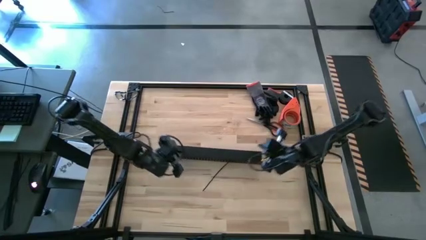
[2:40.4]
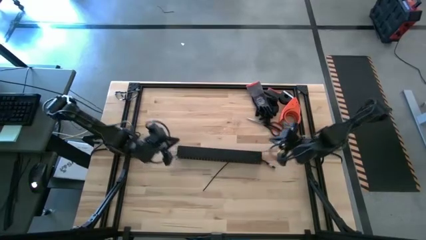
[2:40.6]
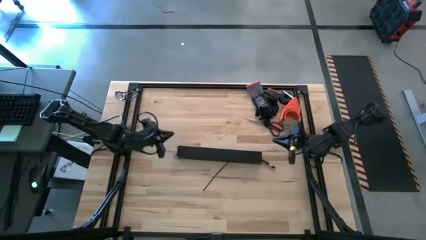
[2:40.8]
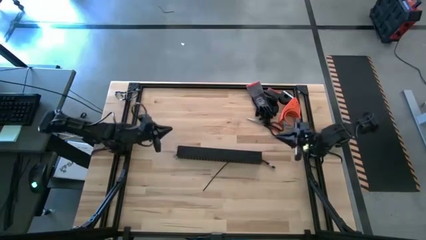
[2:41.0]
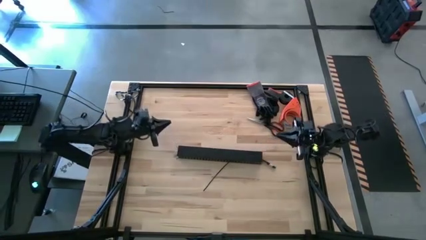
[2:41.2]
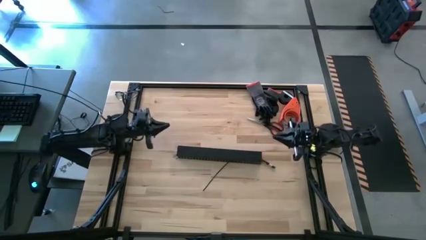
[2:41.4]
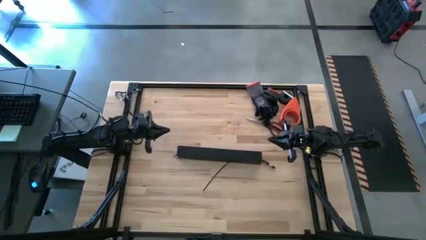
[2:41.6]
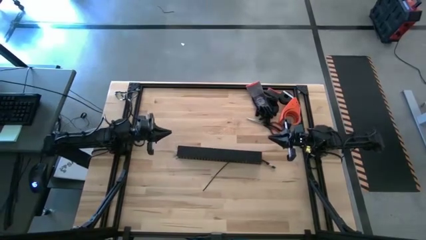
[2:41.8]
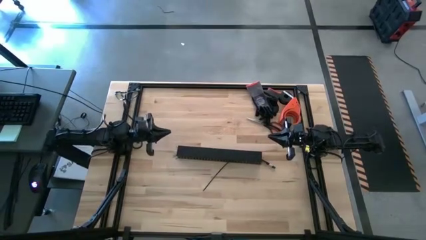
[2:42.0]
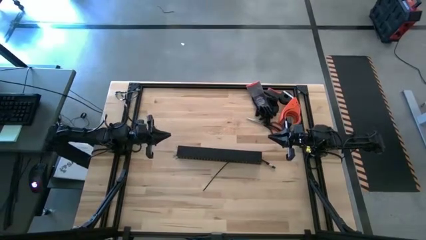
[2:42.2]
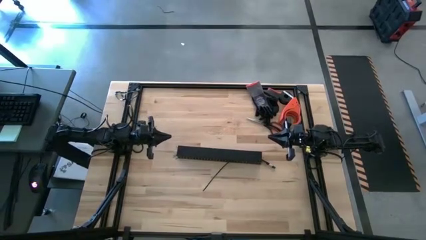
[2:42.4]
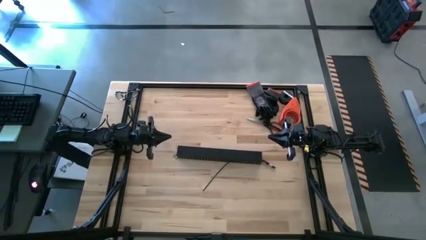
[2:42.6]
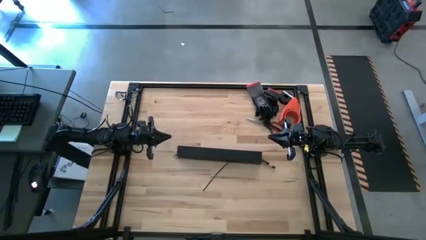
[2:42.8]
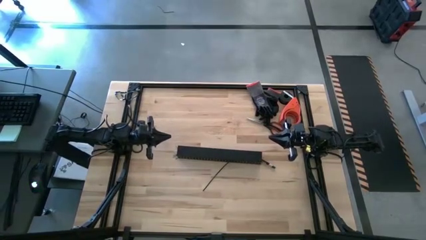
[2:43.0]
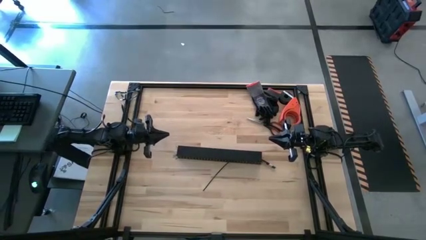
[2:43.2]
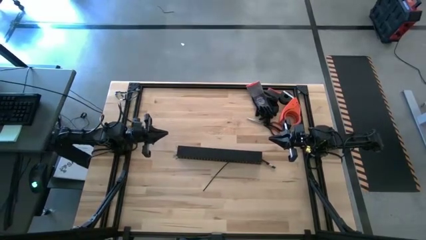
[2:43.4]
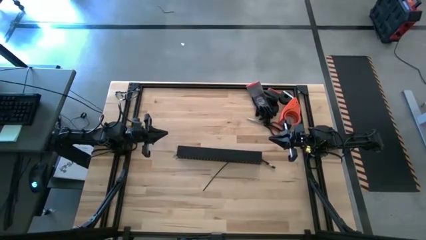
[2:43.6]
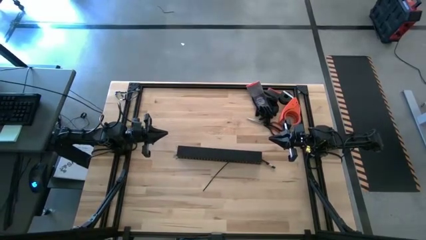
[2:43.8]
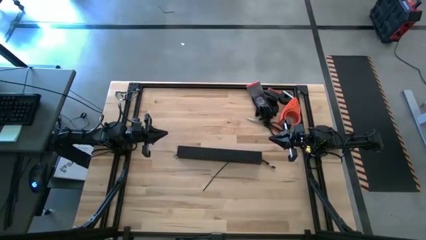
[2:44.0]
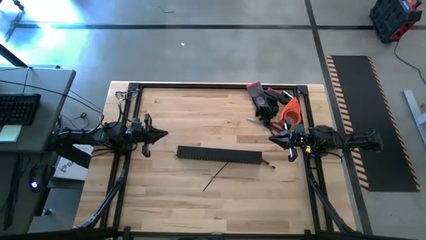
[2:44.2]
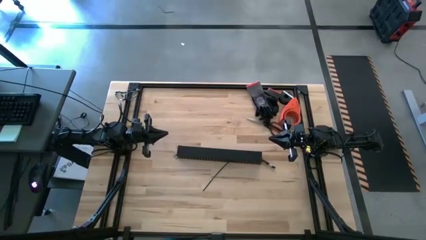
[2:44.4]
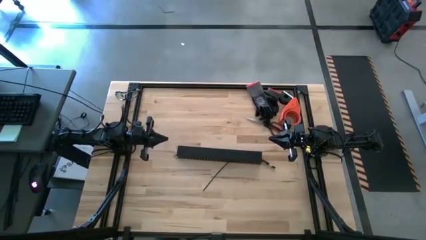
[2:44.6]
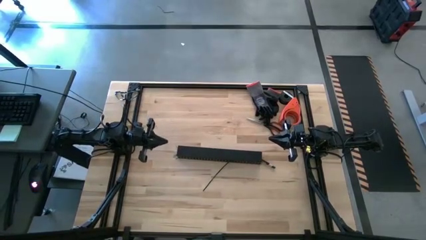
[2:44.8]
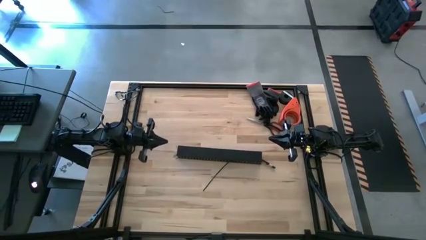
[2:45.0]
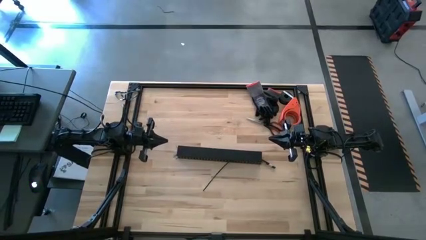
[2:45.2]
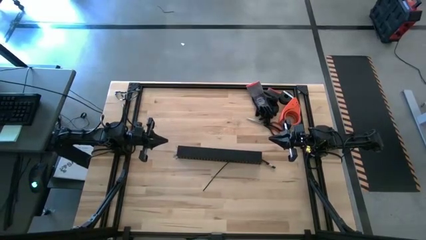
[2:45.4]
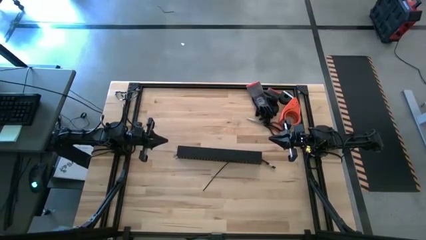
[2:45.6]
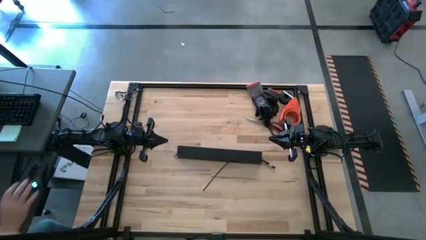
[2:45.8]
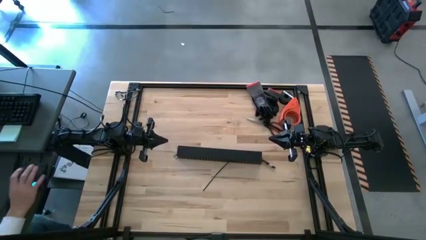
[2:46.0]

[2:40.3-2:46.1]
Task: Ziptie cables
Return to Home Position

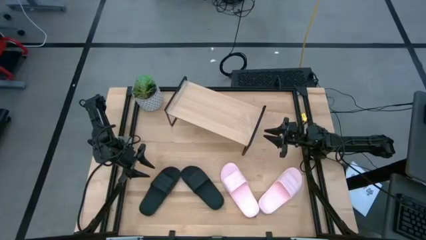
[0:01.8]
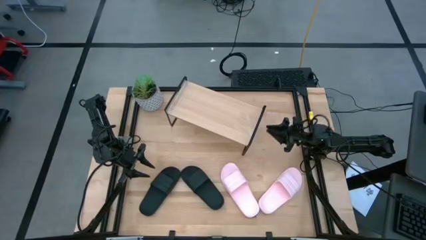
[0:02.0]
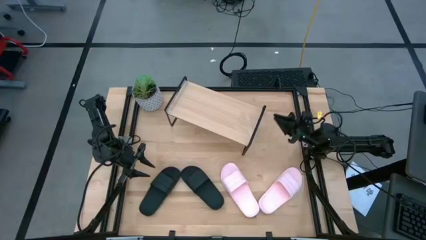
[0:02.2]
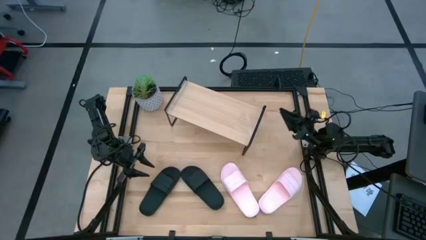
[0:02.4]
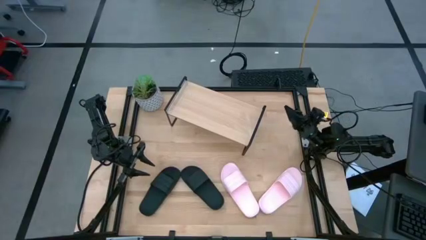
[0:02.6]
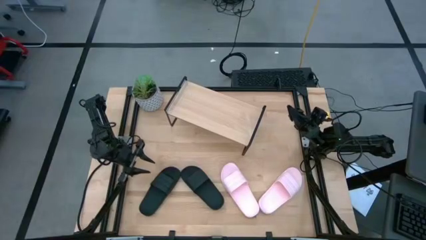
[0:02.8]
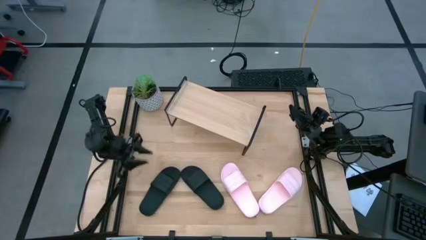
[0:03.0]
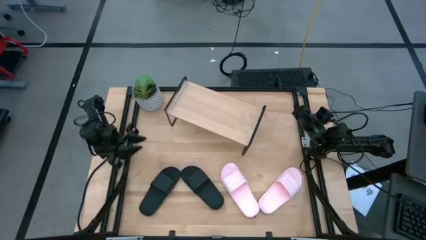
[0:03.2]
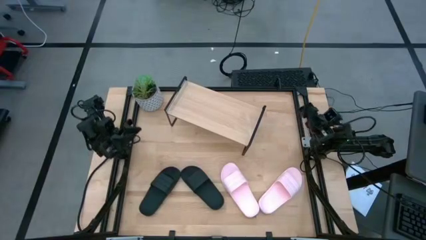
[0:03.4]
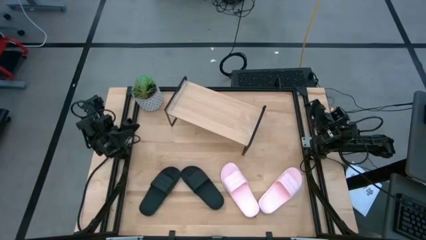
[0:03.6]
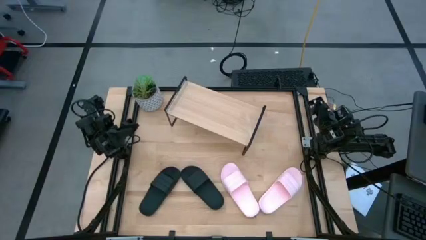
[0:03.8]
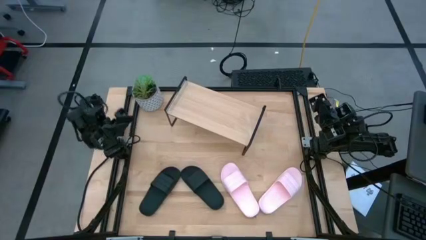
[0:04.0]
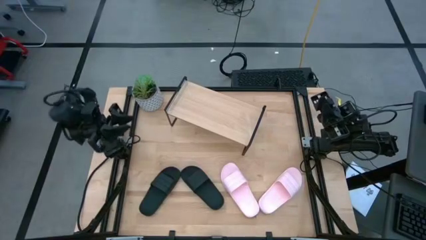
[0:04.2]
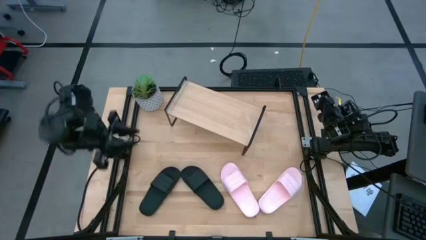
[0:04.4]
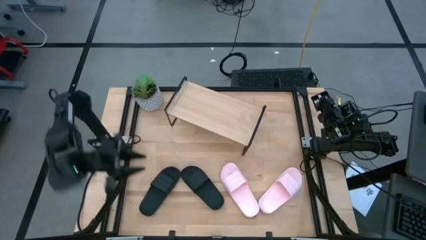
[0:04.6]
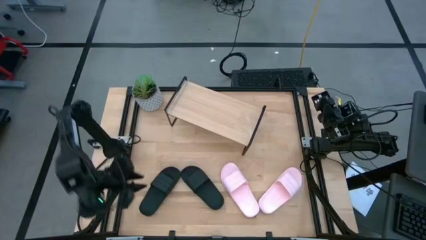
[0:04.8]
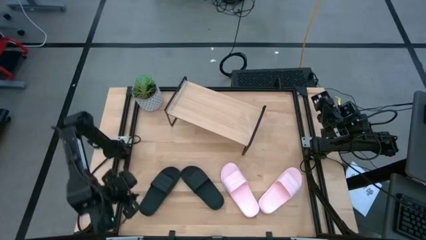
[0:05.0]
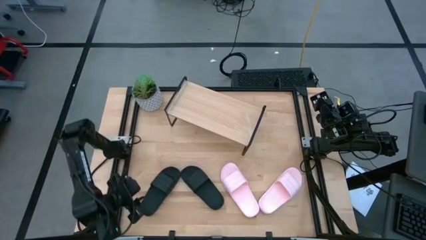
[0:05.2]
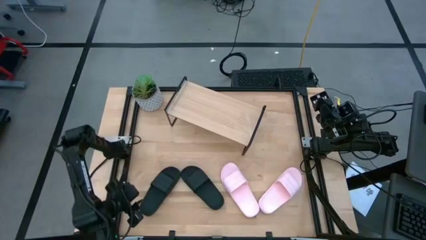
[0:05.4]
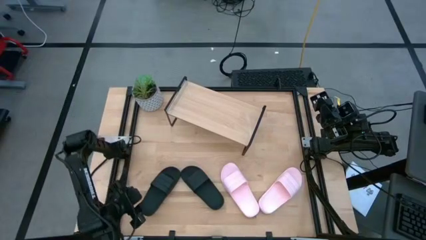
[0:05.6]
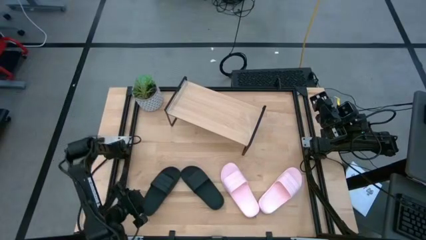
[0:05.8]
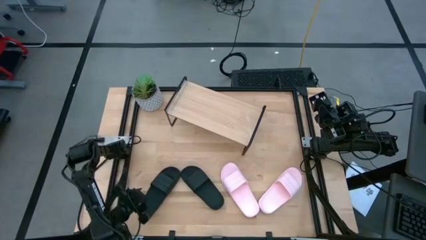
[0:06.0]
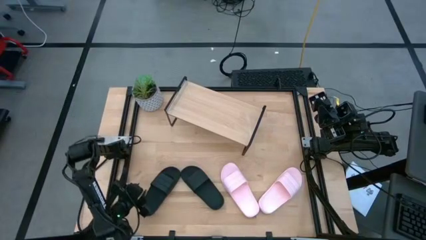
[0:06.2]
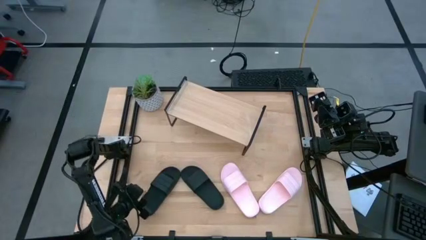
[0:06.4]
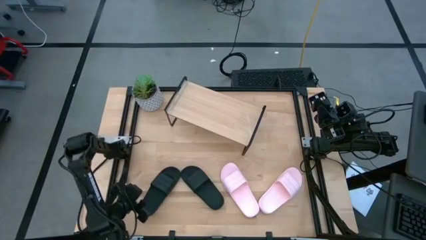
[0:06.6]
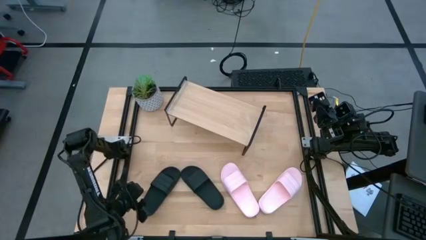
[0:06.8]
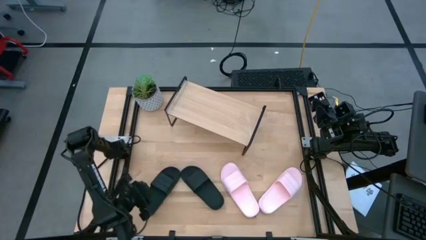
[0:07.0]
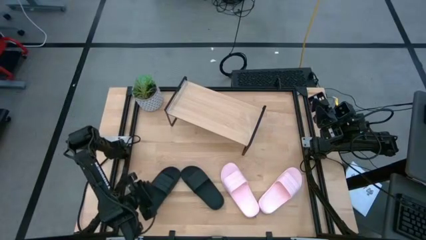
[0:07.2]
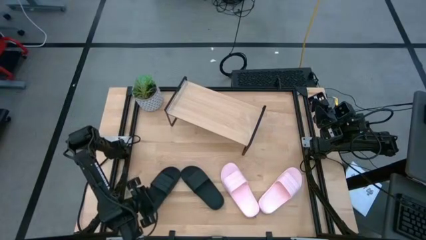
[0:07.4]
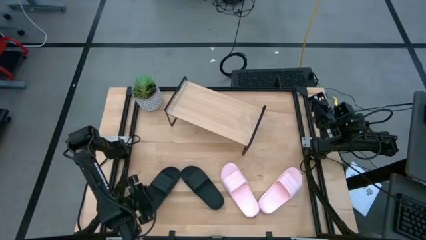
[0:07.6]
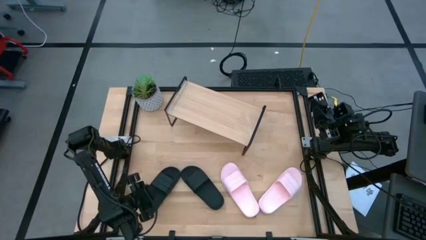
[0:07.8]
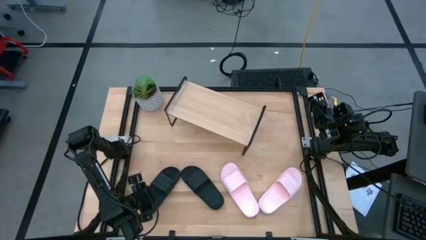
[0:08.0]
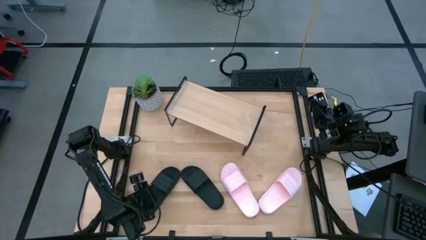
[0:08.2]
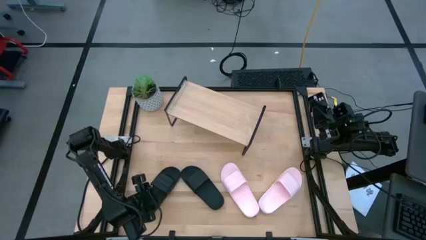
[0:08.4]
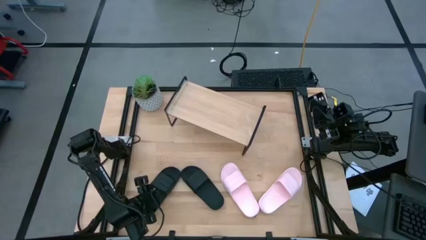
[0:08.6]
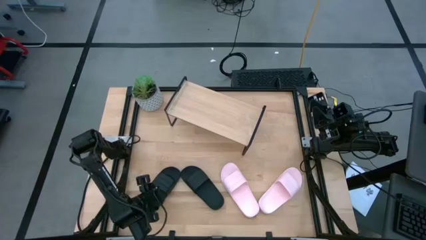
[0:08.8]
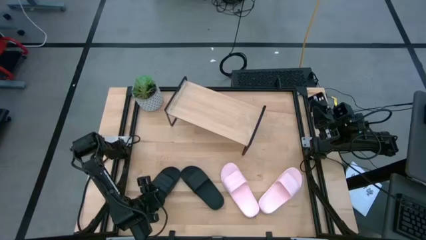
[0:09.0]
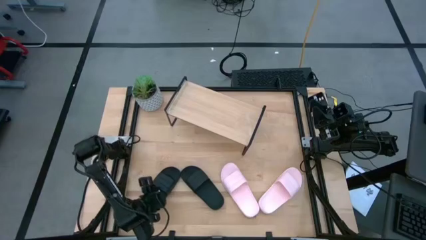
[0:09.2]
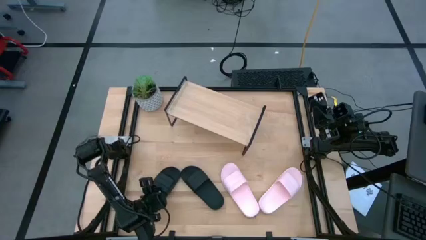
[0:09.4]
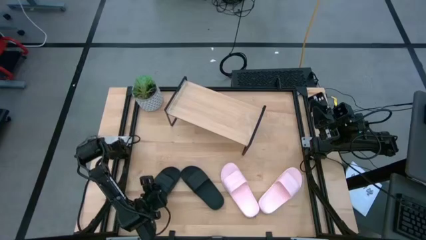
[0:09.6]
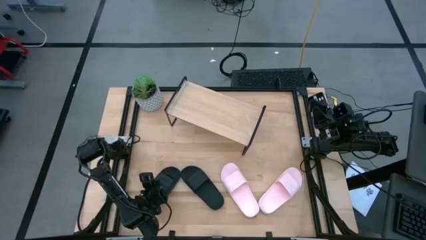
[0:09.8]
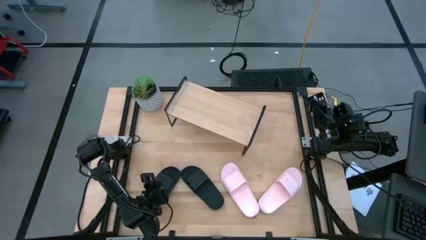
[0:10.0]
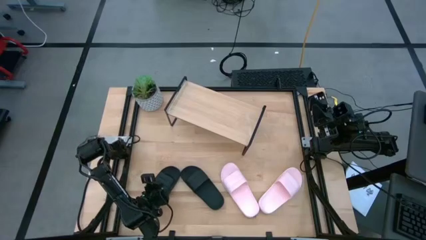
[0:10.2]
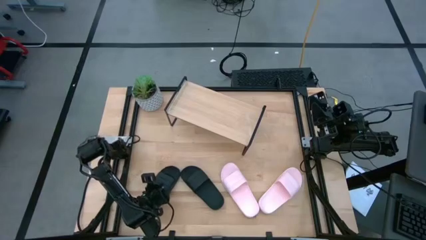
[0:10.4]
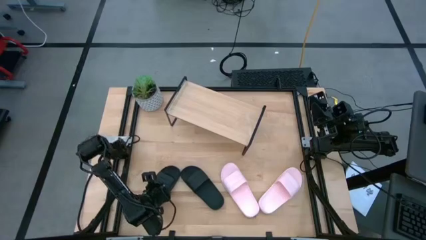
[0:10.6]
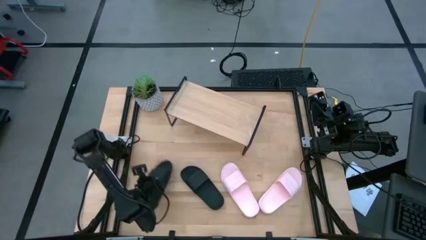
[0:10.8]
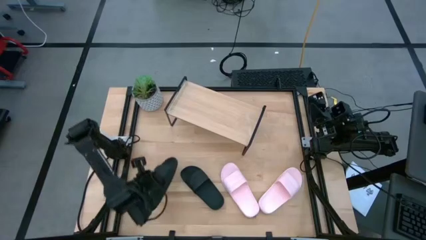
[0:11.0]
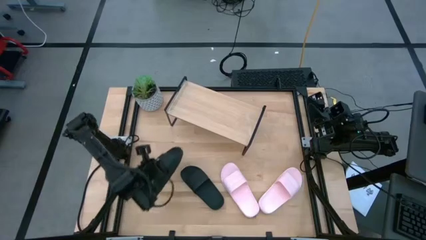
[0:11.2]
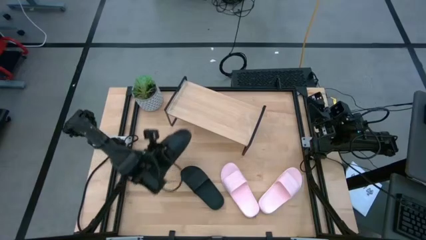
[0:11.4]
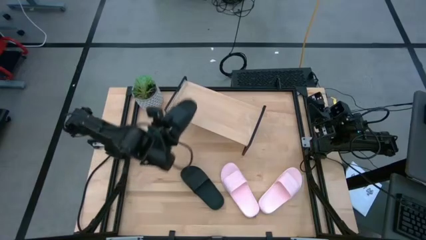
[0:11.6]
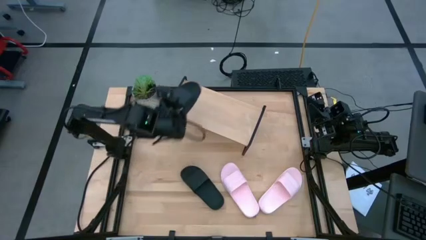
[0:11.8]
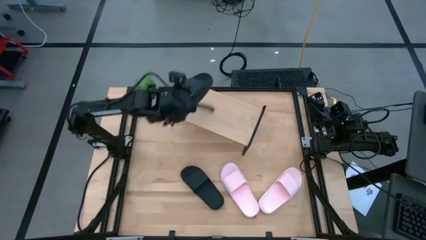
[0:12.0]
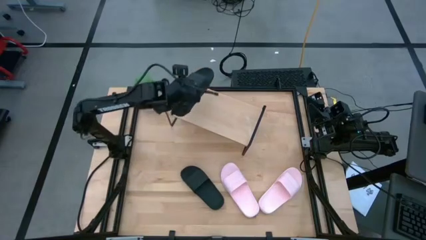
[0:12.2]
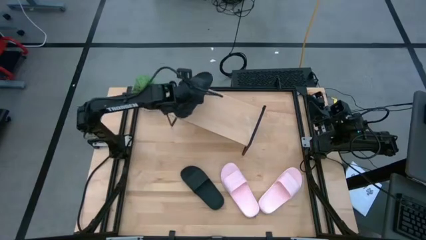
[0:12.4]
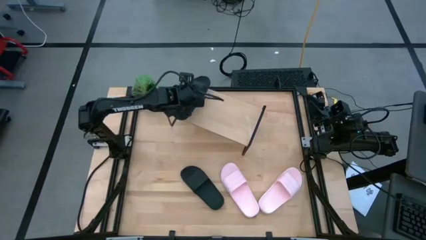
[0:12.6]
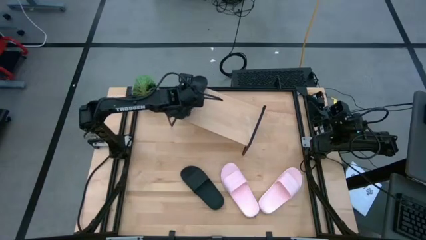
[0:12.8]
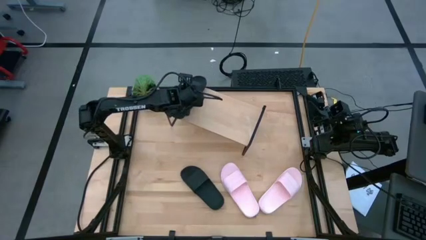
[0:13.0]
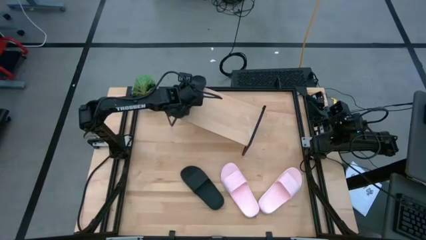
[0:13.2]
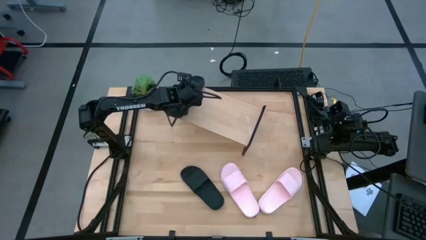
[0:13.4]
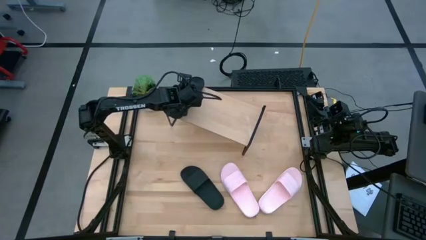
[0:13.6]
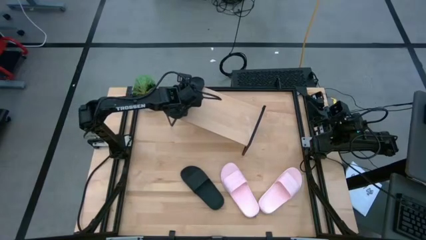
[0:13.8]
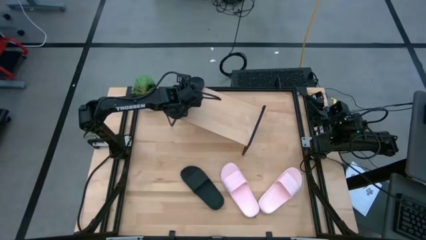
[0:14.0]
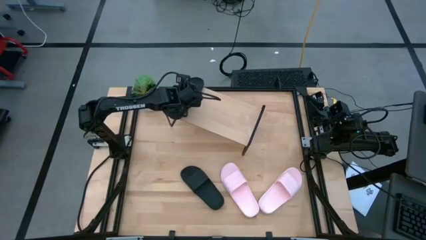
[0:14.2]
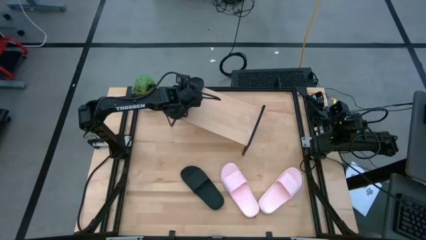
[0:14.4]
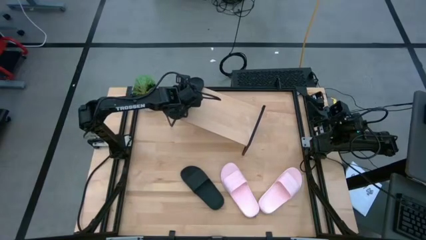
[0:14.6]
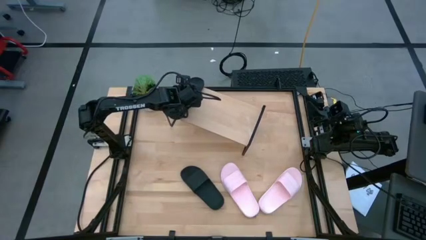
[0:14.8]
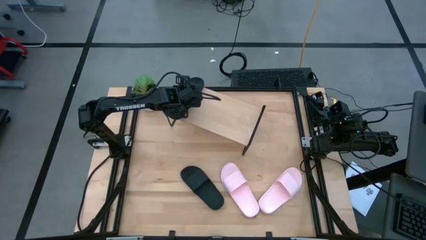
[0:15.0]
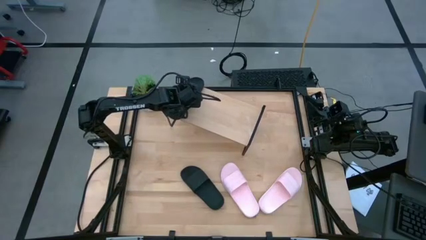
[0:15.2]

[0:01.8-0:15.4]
Task: Pick and place slides into the shelf
Put the left black slipper on the shelf
